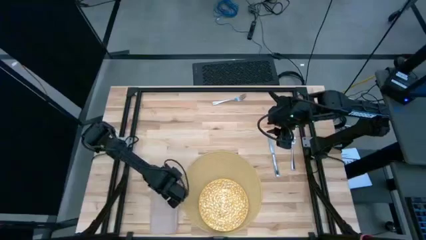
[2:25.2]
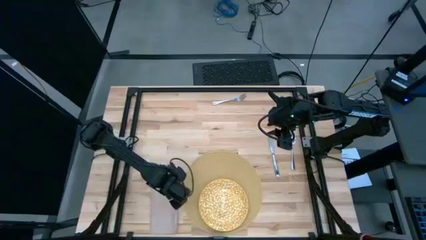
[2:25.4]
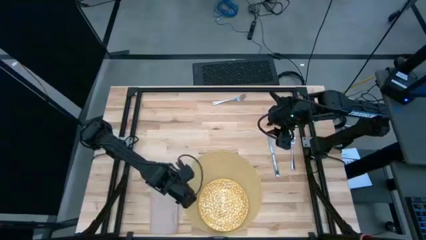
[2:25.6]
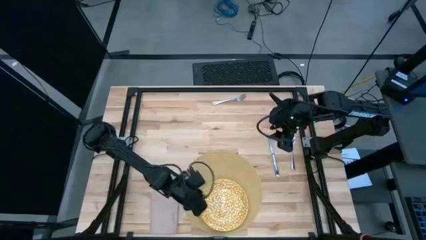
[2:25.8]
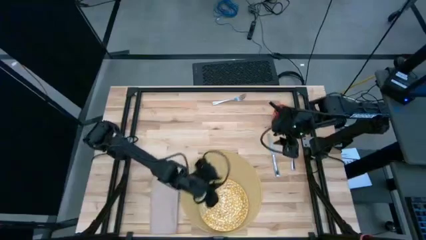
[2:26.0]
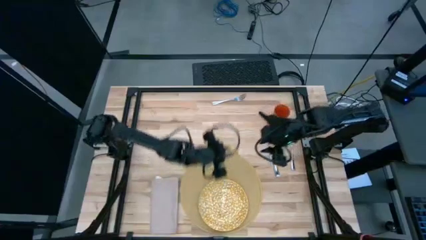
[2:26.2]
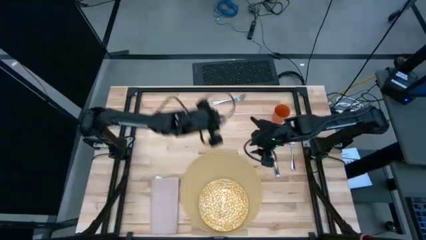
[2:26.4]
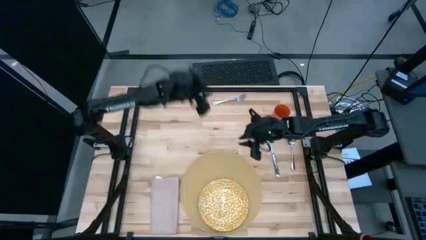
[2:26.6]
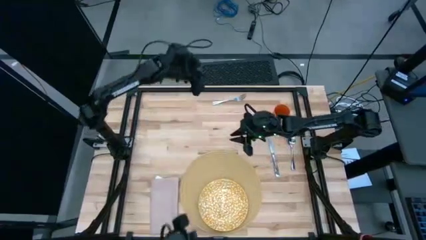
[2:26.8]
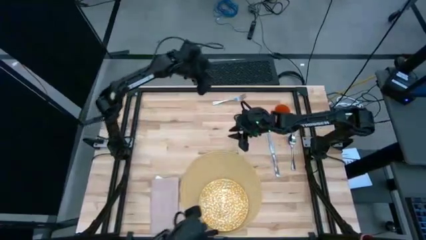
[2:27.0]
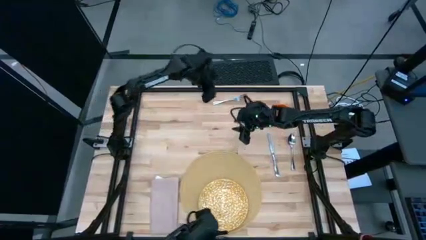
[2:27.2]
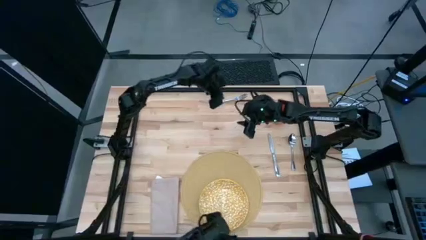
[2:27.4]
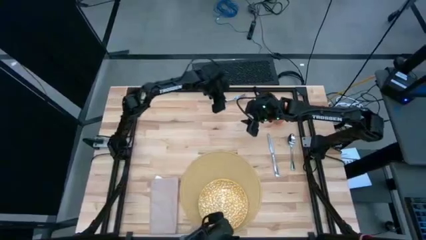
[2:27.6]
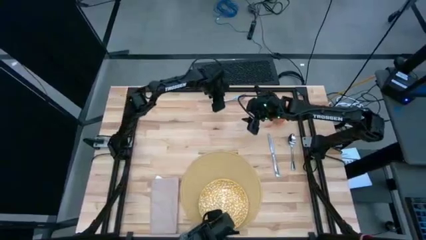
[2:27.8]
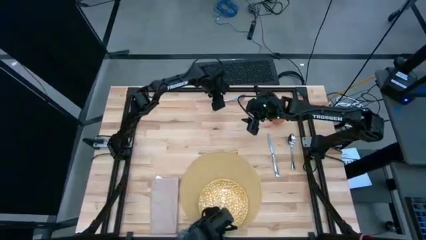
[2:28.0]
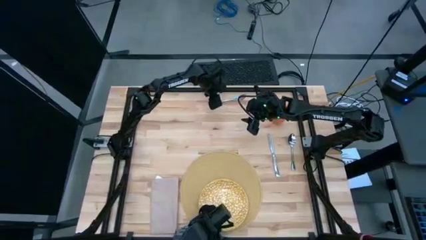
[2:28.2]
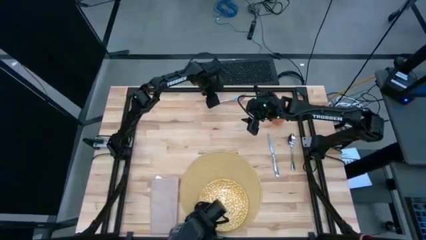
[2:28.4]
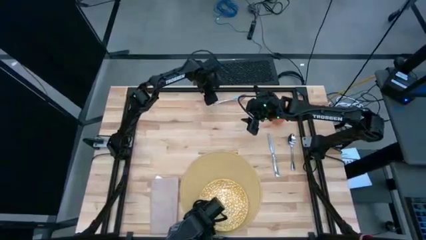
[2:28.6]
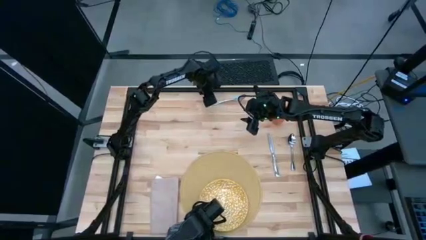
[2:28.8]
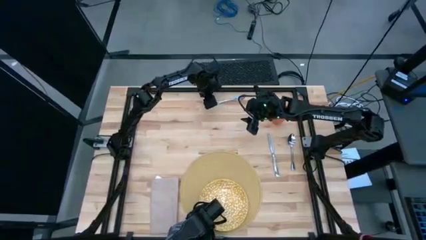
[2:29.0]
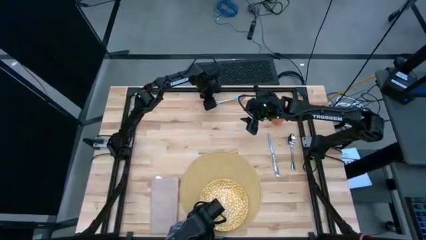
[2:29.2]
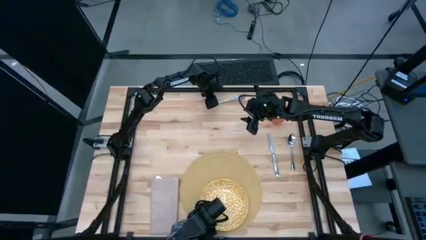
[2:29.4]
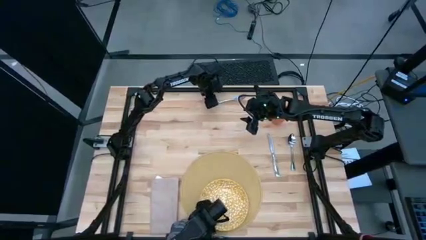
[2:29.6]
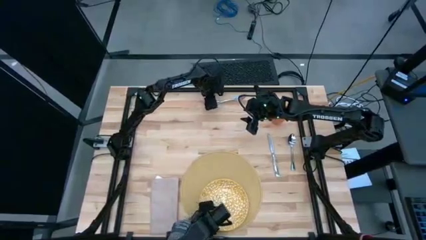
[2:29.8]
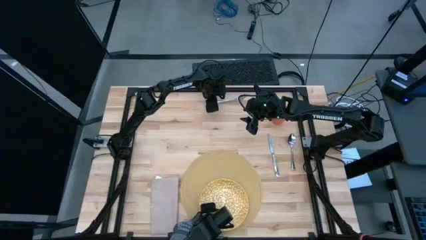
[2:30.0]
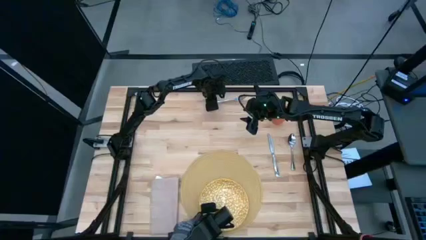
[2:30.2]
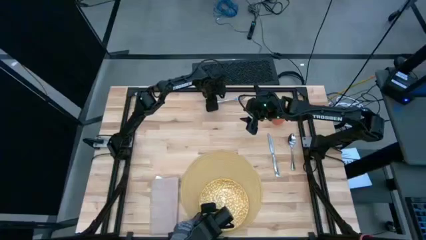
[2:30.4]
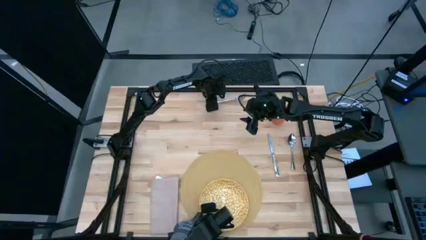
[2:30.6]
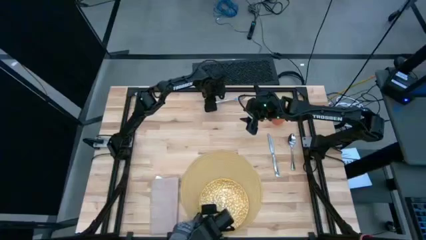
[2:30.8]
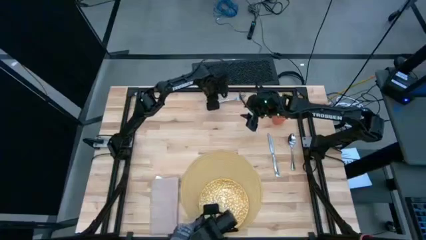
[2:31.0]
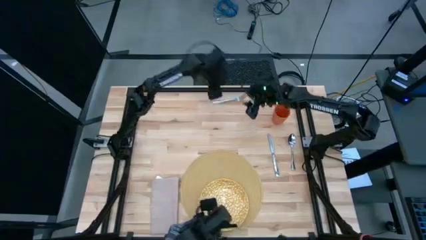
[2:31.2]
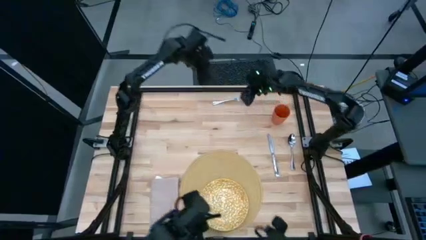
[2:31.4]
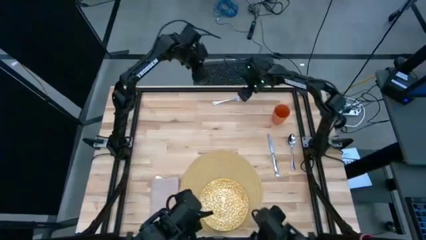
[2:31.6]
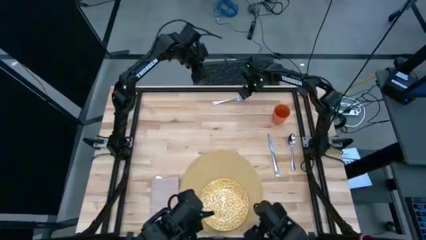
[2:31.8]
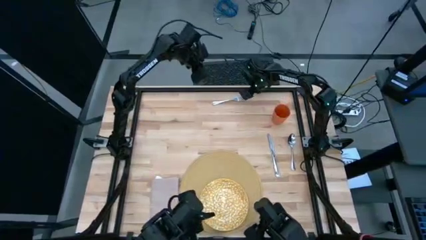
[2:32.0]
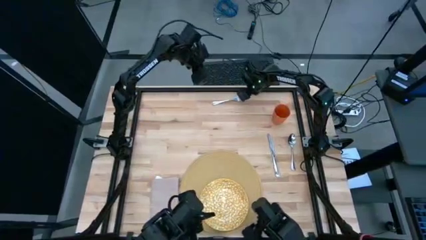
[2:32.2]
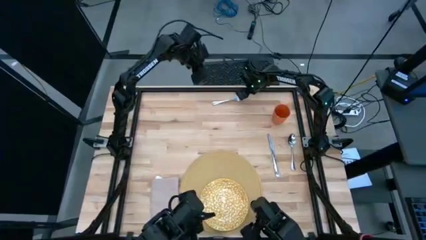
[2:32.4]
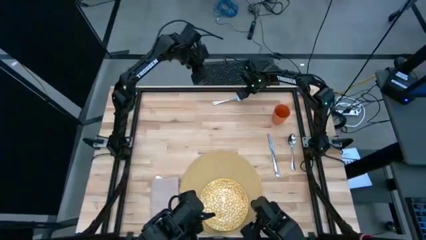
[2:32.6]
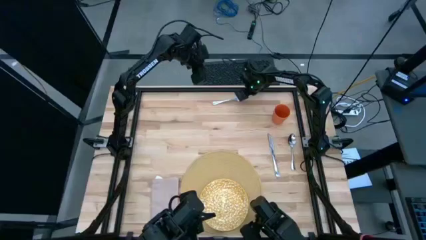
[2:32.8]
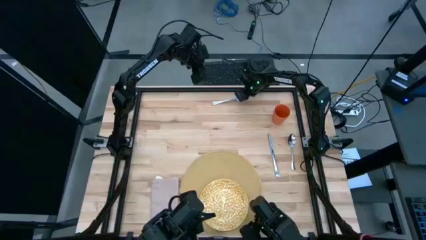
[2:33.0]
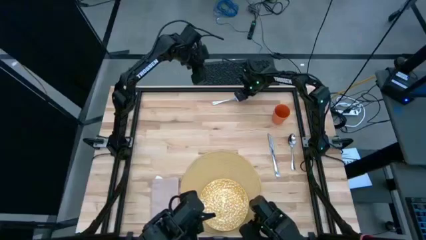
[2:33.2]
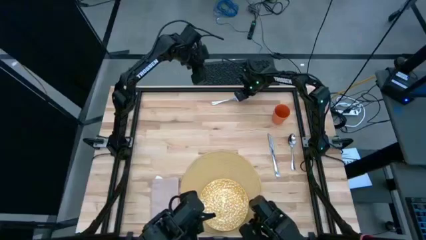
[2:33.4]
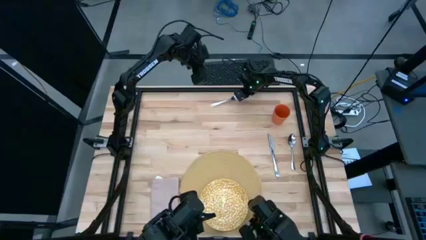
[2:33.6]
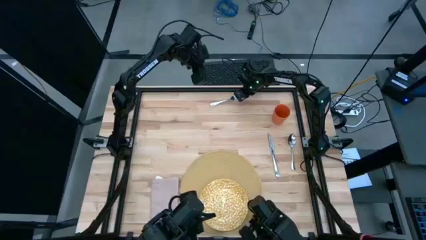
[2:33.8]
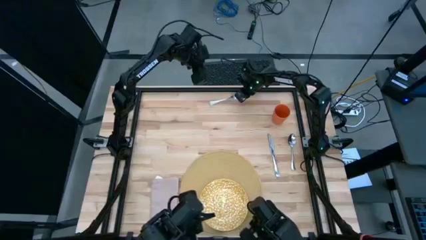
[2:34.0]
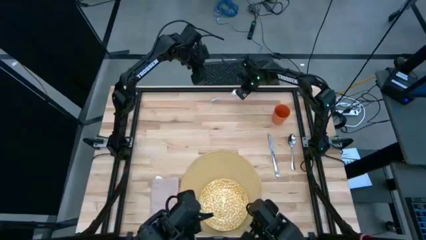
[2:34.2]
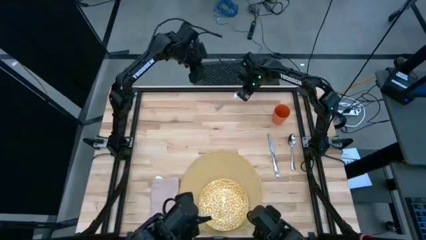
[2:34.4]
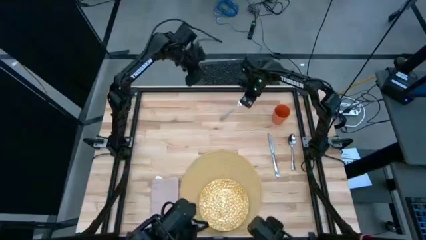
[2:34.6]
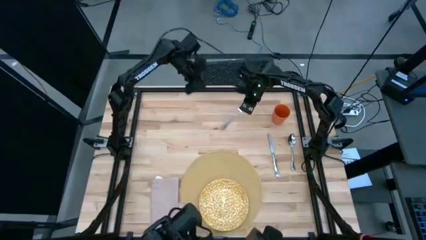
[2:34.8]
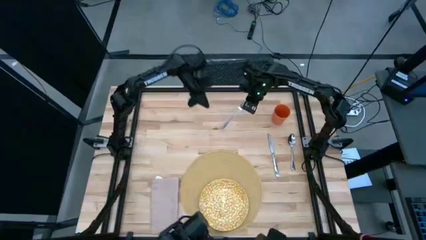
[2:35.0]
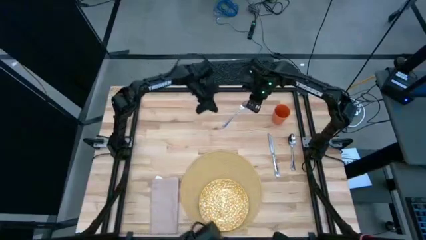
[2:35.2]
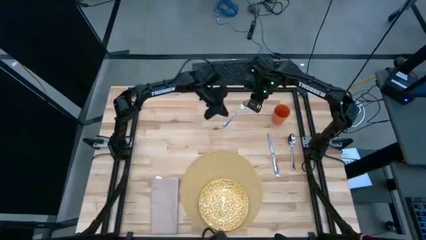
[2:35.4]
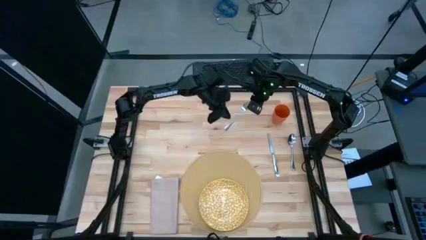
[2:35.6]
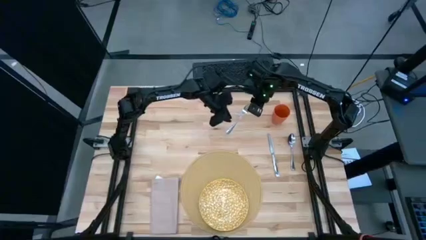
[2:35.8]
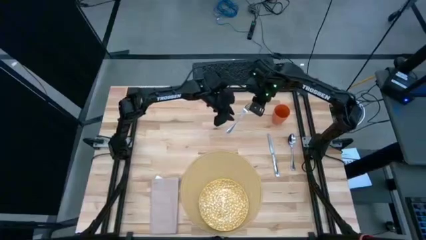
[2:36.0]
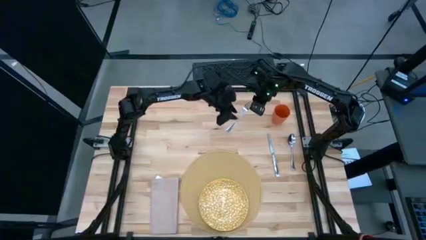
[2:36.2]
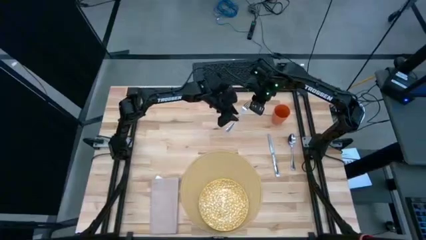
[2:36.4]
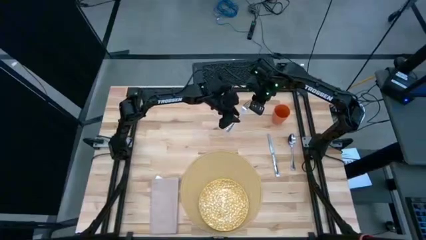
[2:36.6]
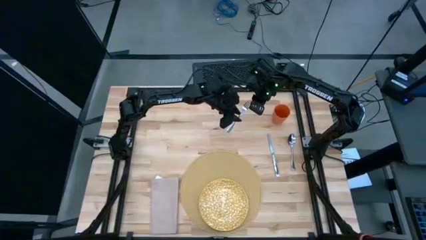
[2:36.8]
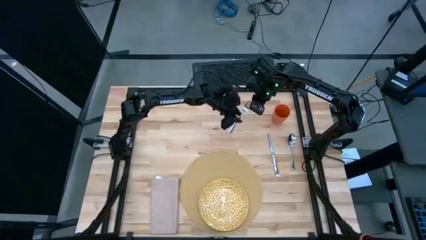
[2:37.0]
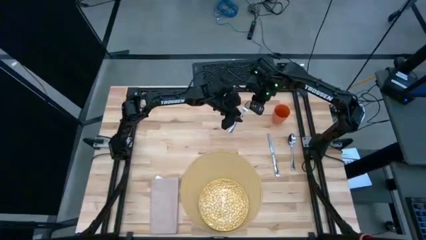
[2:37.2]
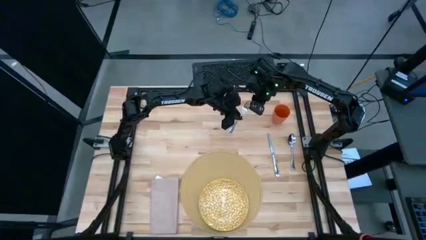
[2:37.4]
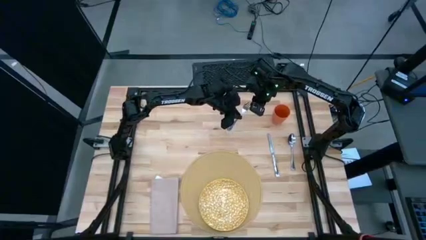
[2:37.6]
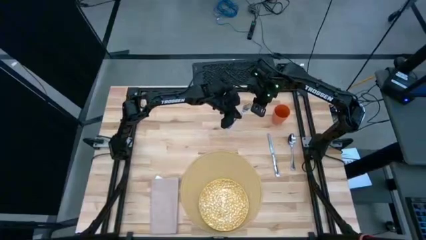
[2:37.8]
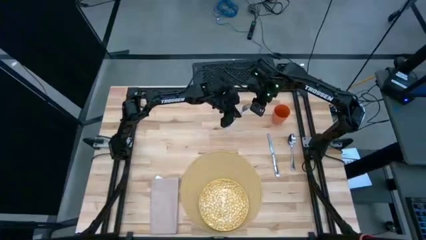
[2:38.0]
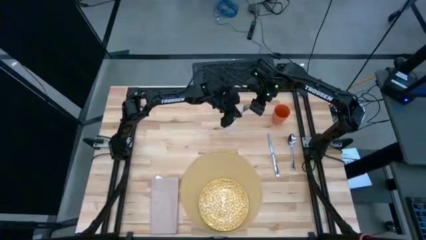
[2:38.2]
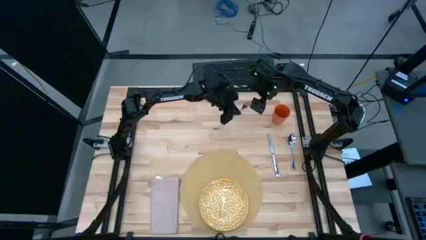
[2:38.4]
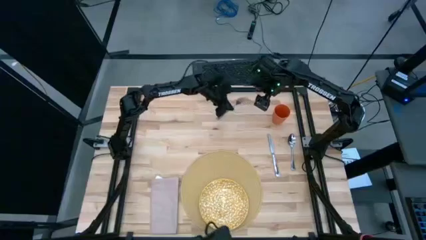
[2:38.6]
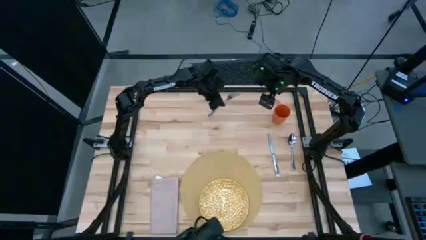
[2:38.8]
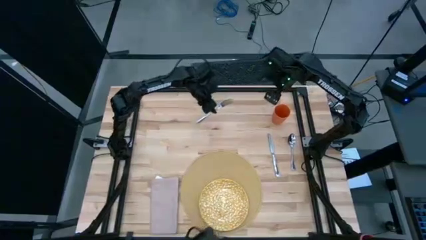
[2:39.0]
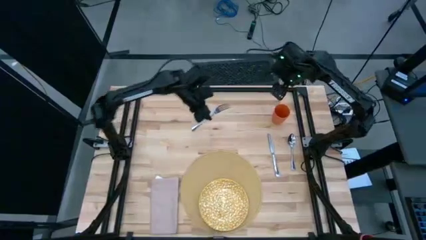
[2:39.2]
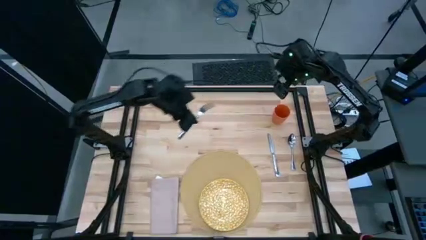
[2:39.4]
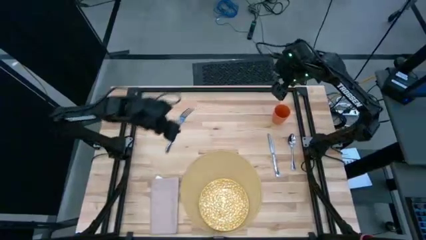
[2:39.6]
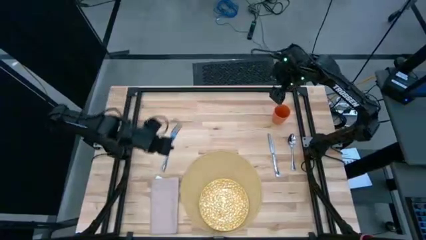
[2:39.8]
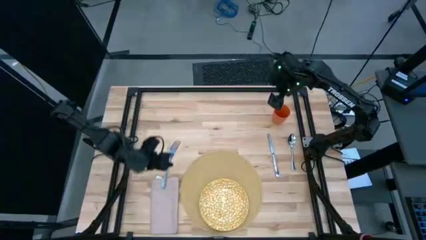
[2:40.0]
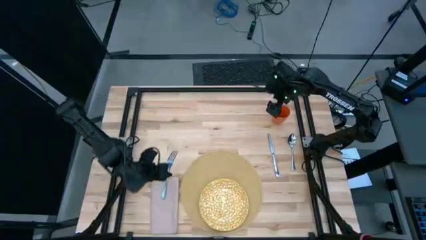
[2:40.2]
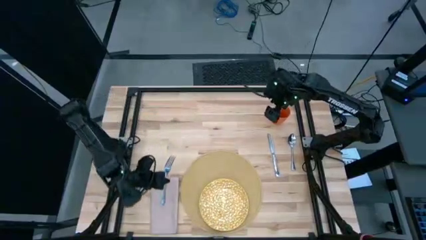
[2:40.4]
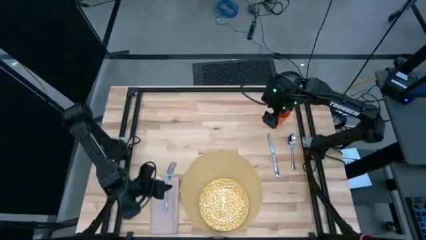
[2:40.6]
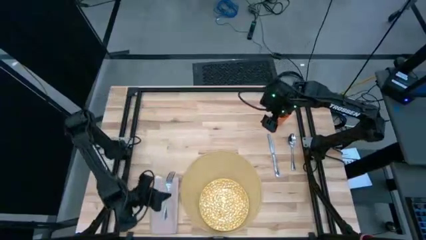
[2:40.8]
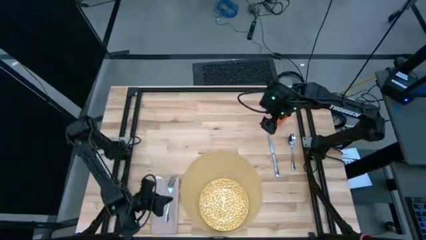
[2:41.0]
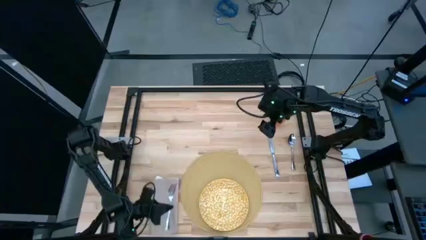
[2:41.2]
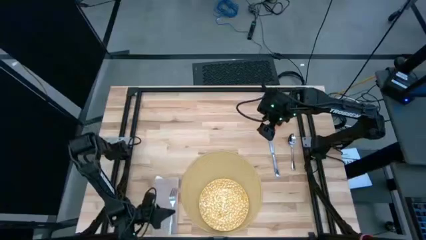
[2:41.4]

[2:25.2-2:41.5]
Task: Set table place
Put the fork on the brown table napkin

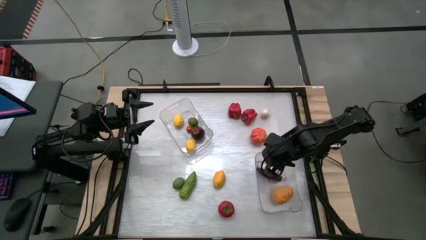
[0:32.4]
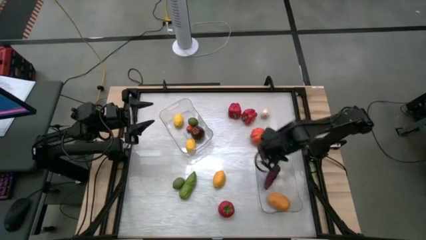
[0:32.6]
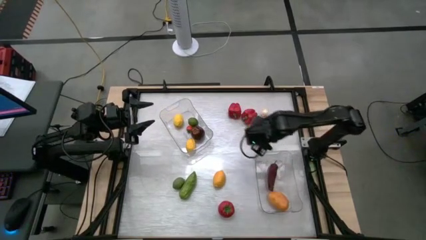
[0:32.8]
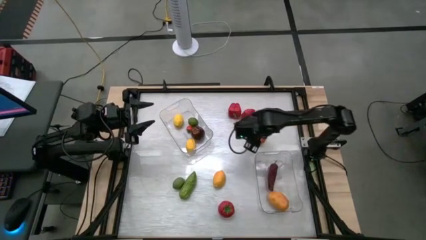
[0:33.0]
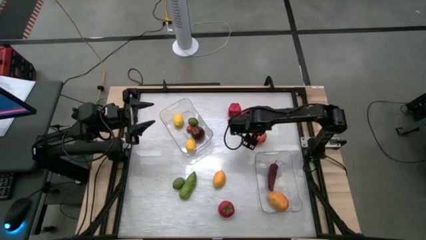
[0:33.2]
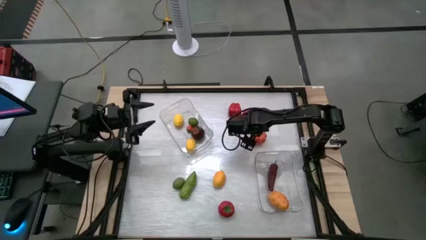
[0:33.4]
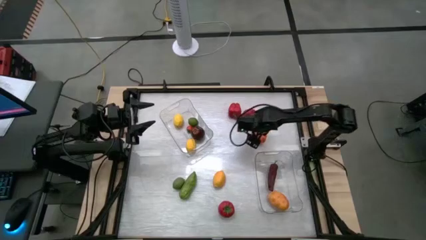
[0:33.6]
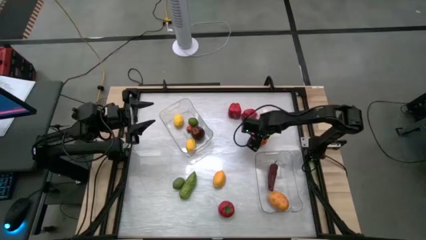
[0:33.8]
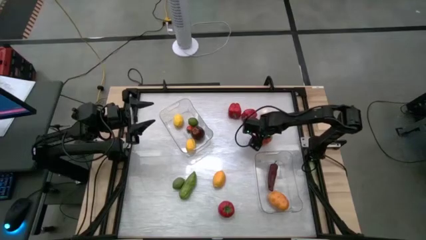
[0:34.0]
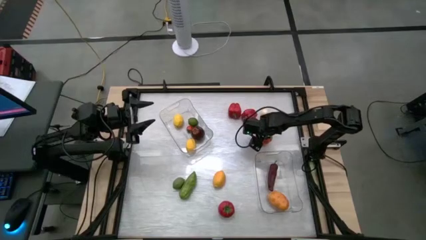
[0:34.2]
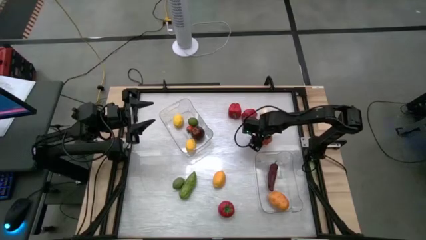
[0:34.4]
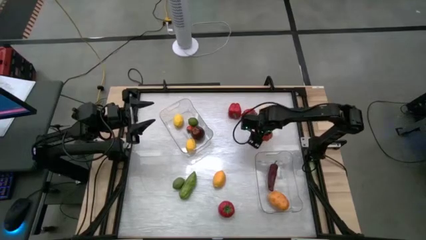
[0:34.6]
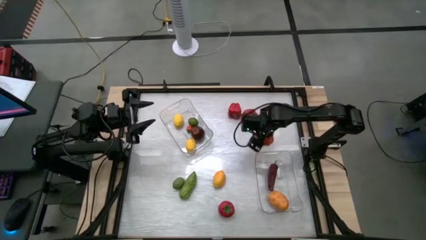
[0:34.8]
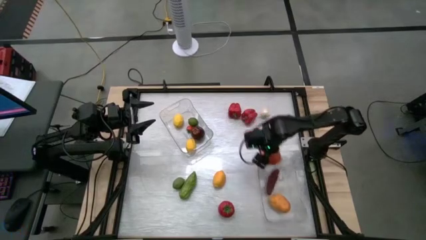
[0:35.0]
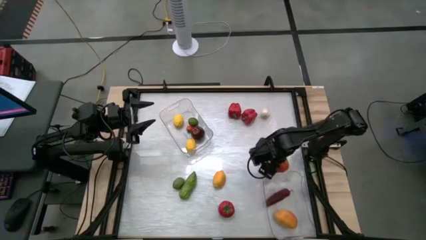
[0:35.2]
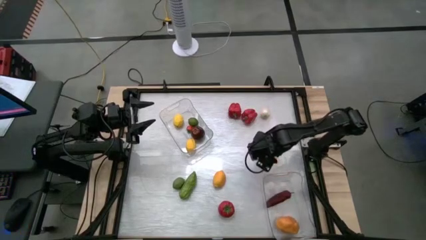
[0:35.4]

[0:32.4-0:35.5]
Task: Sort produce into baskets
Put the orange pumpkin into the bottom transparent bin
